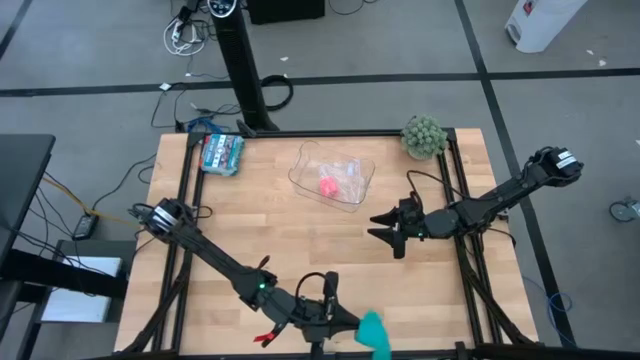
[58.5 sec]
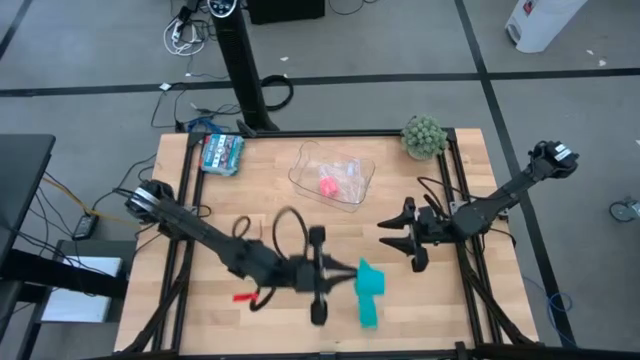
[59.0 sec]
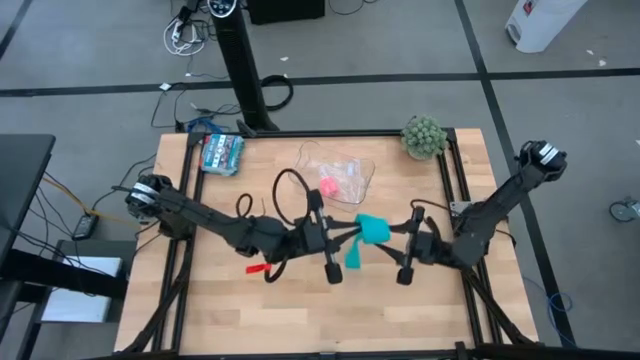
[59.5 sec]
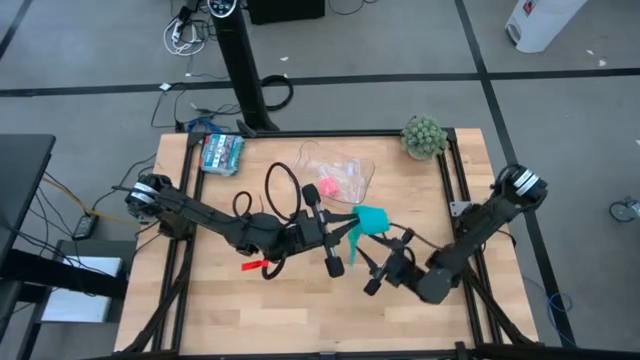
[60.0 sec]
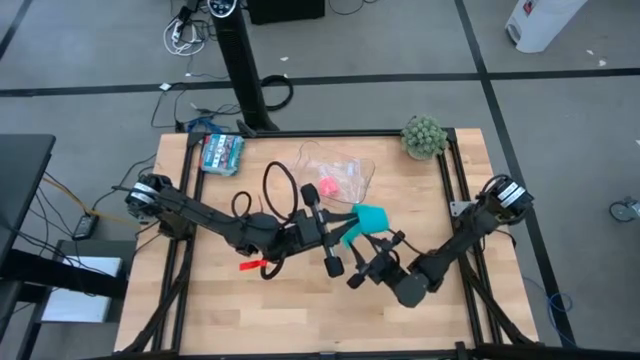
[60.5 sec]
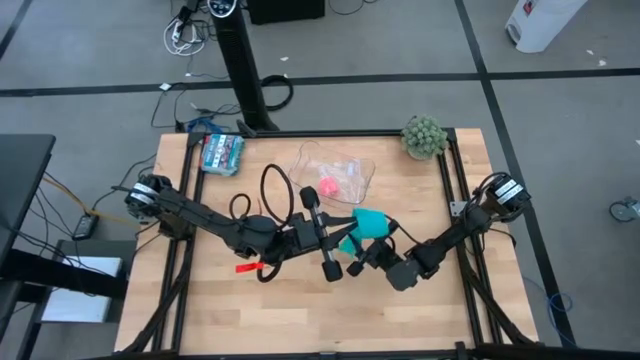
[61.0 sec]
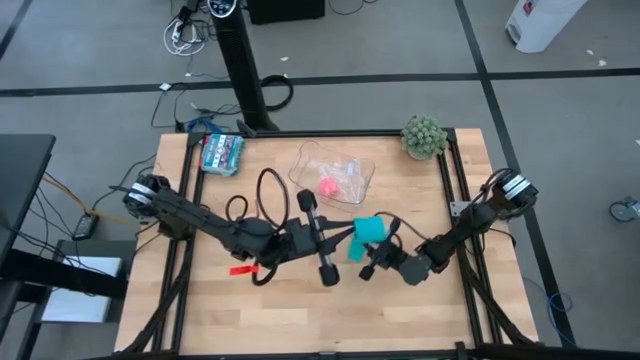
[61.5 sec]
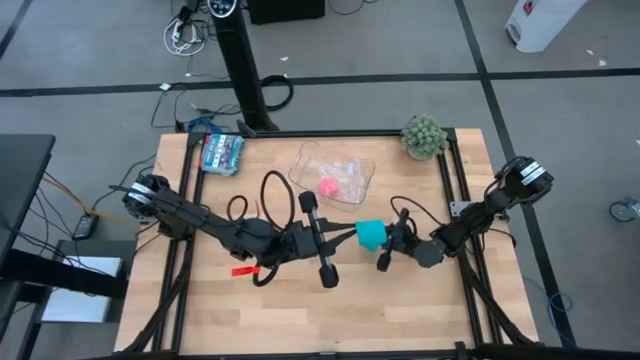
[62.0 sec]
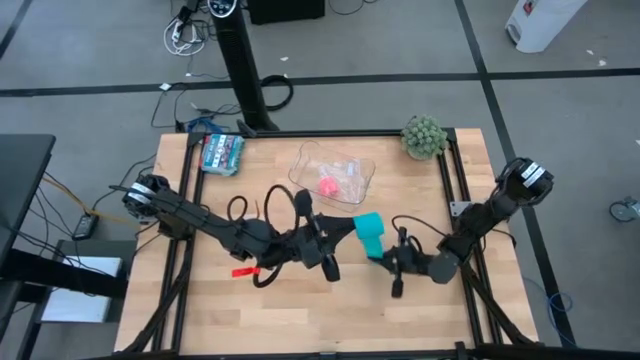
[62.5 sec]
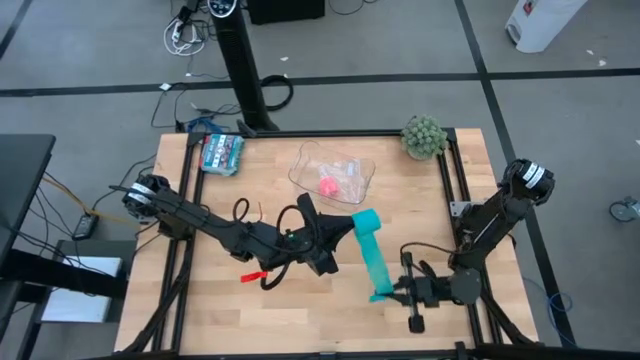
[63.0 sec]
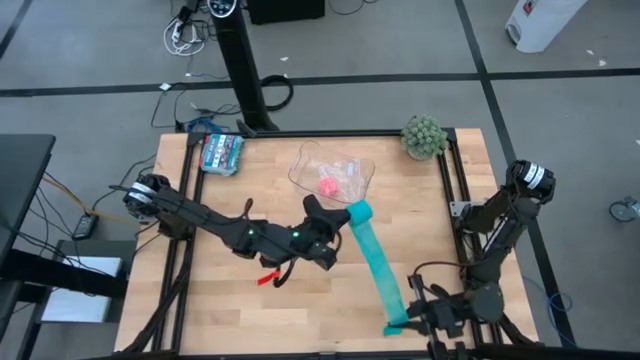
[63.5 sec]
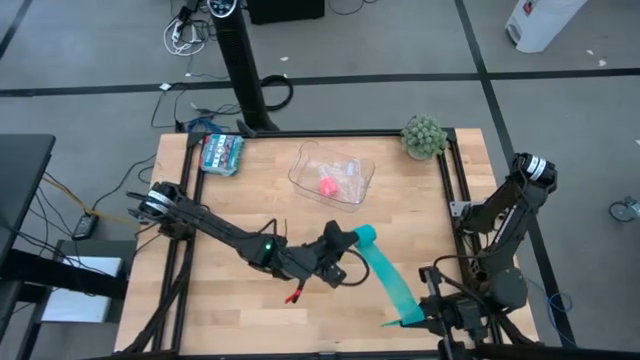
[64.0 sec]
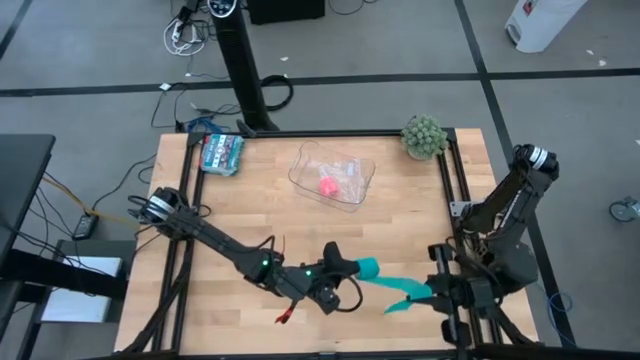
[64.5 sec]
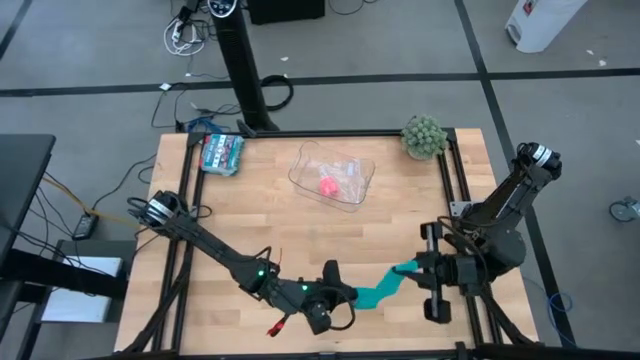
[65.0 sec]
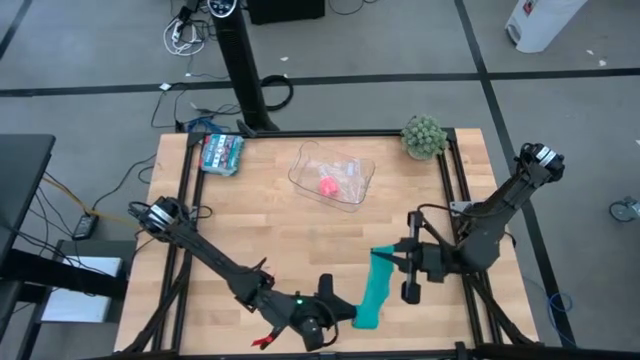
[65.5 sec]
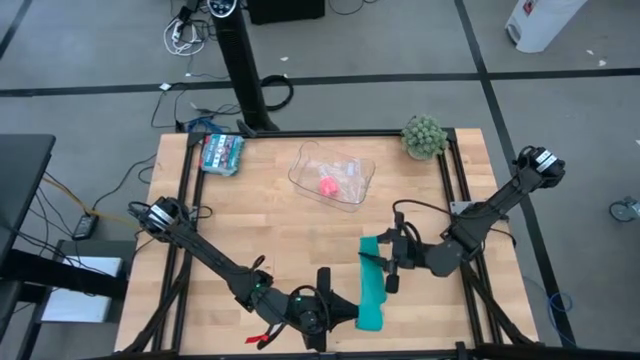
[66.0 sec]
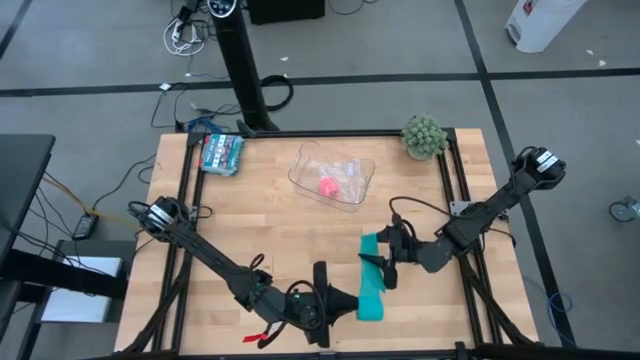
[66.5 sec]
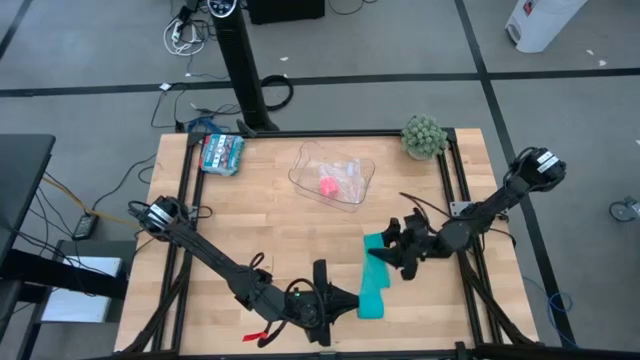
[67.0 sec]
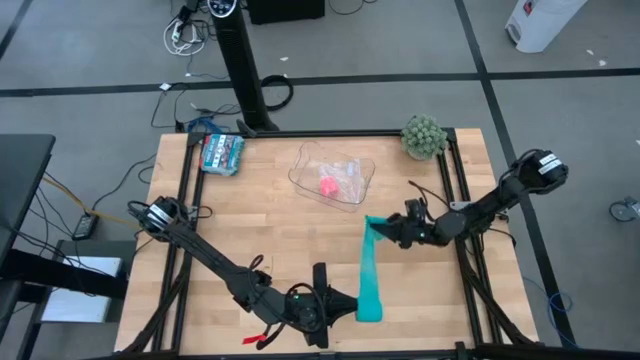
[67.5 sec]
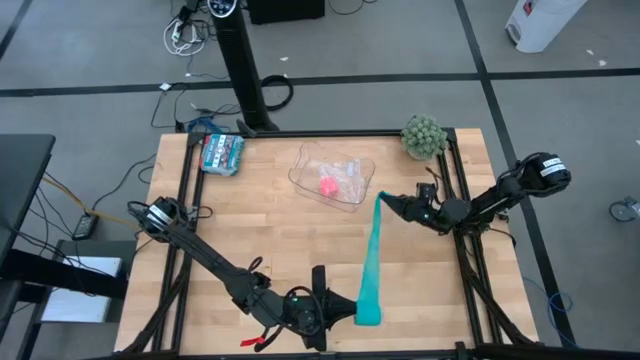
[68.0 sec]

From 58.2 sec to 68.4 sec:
Task: Roll bandage
Roll the blue bandage

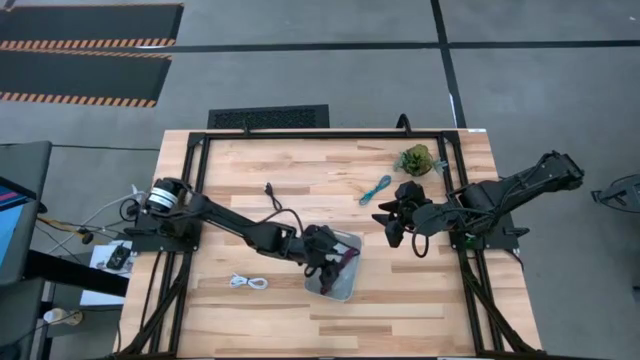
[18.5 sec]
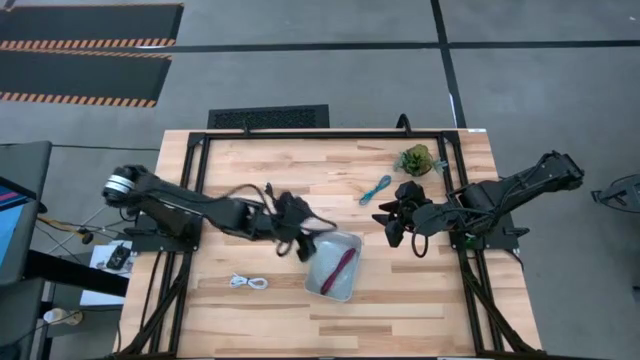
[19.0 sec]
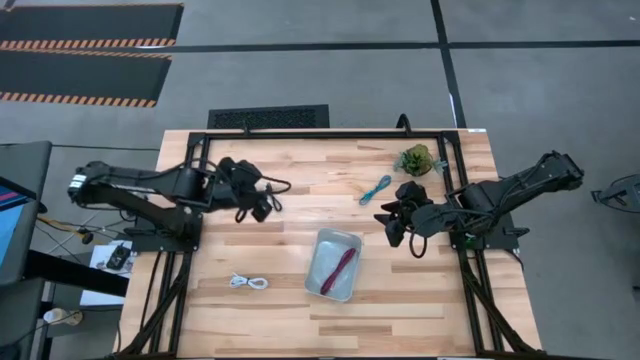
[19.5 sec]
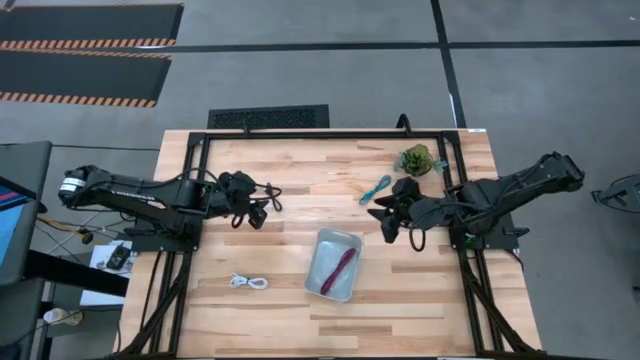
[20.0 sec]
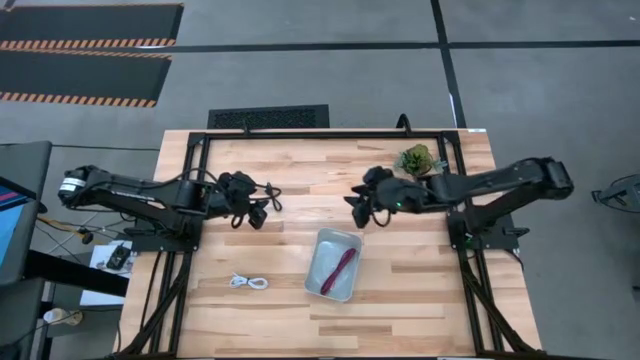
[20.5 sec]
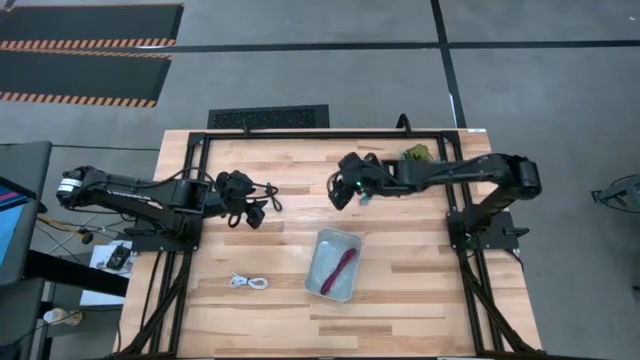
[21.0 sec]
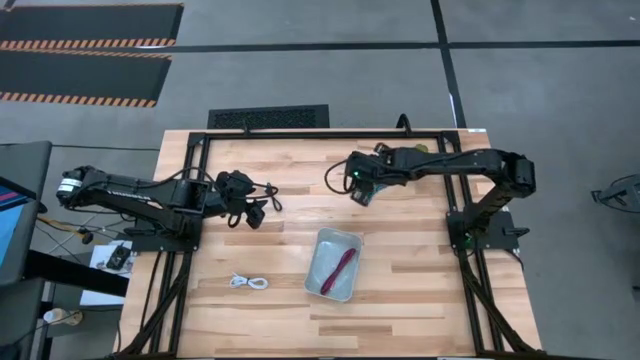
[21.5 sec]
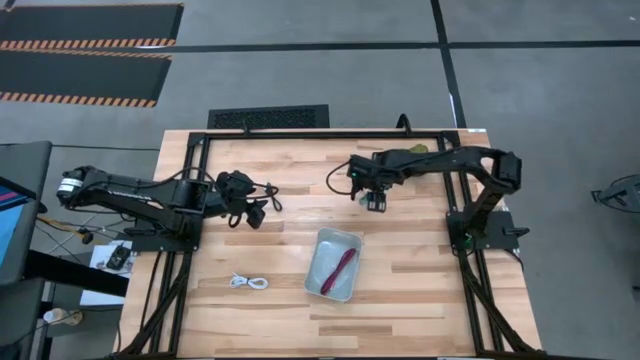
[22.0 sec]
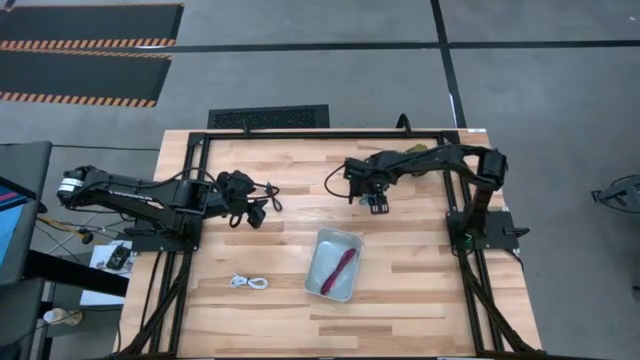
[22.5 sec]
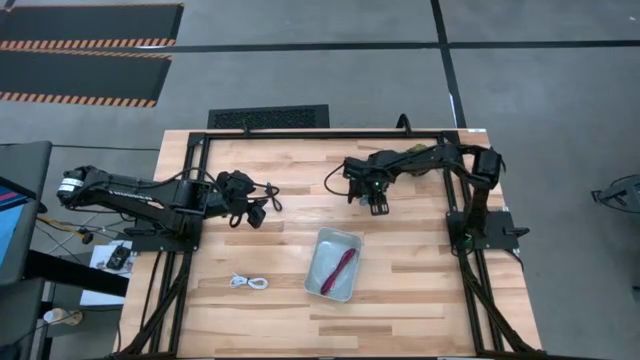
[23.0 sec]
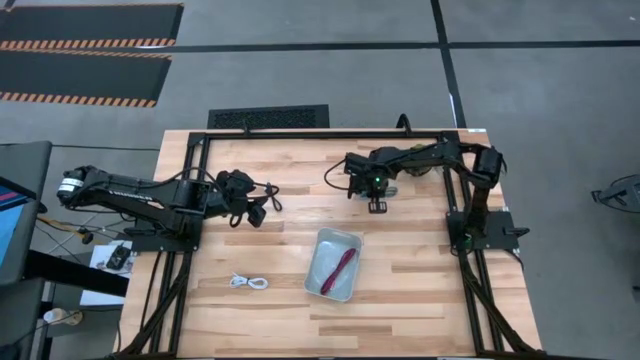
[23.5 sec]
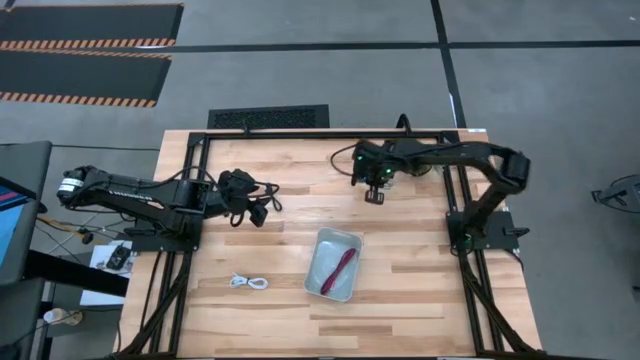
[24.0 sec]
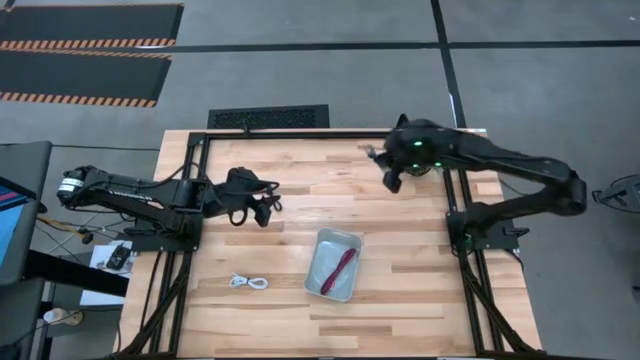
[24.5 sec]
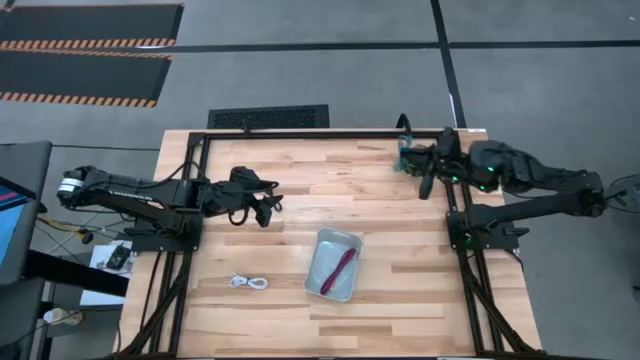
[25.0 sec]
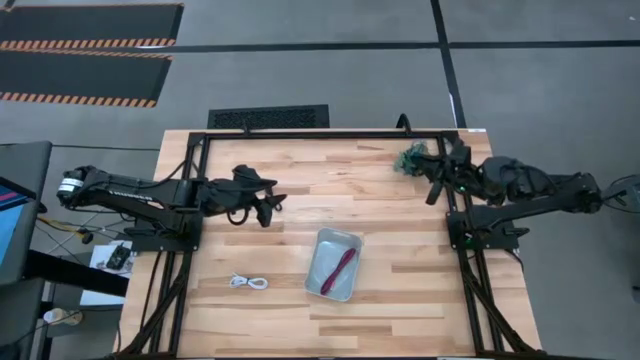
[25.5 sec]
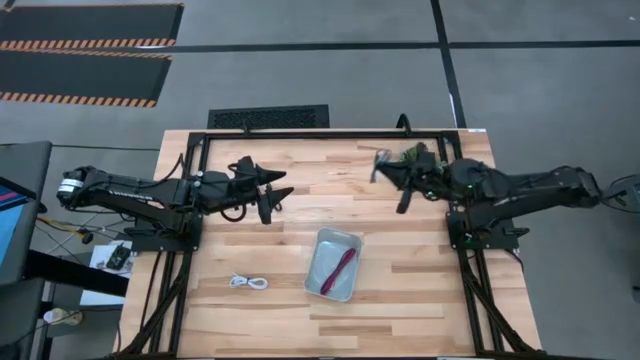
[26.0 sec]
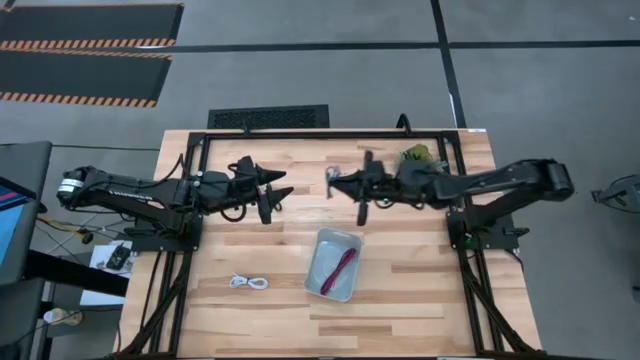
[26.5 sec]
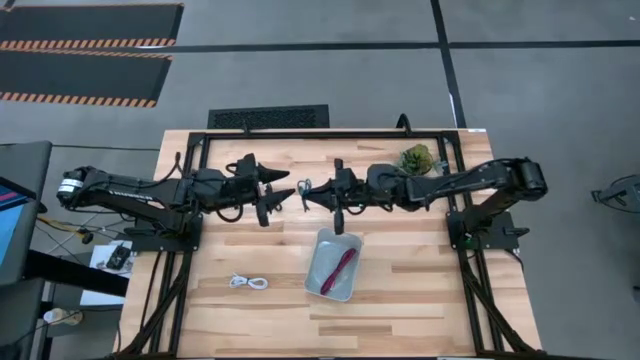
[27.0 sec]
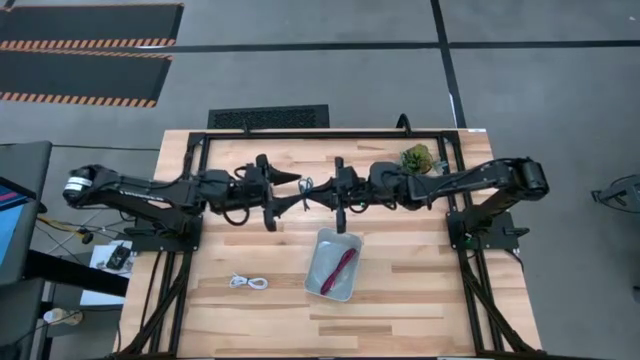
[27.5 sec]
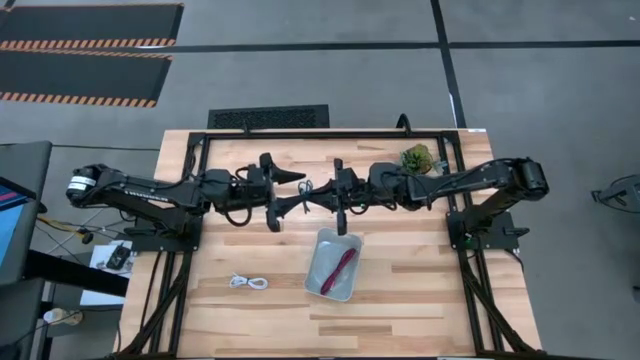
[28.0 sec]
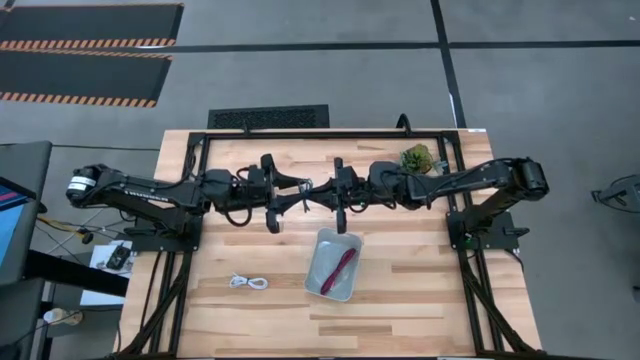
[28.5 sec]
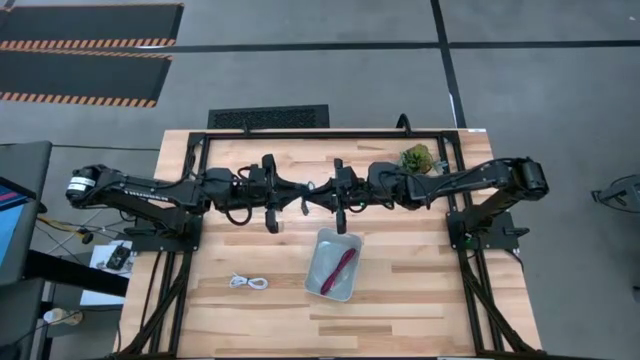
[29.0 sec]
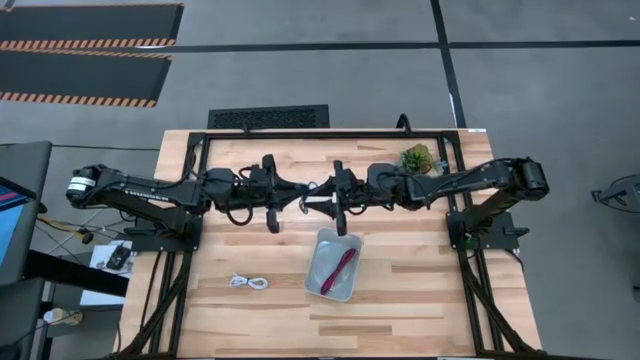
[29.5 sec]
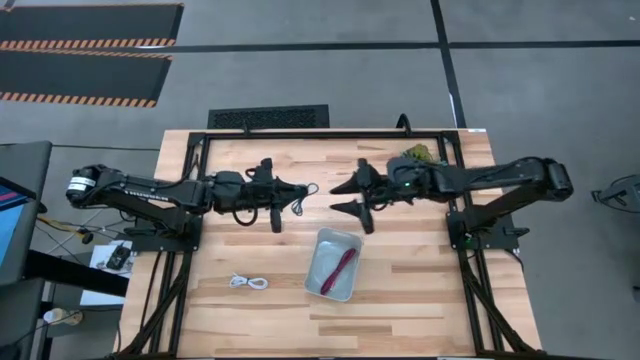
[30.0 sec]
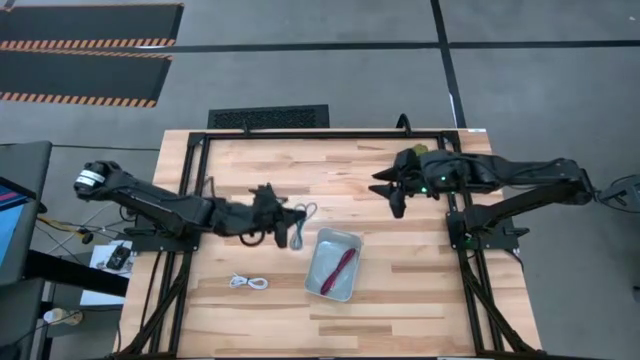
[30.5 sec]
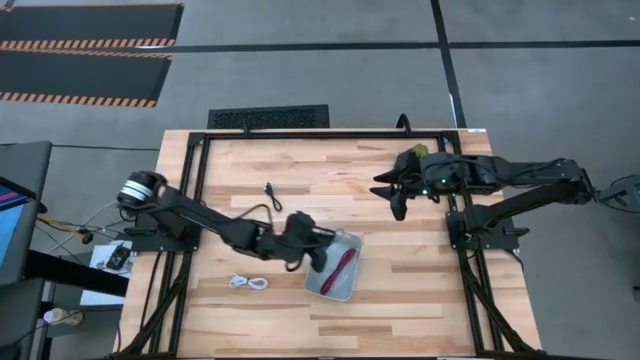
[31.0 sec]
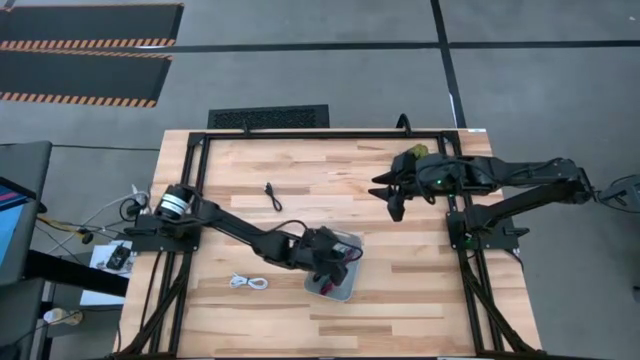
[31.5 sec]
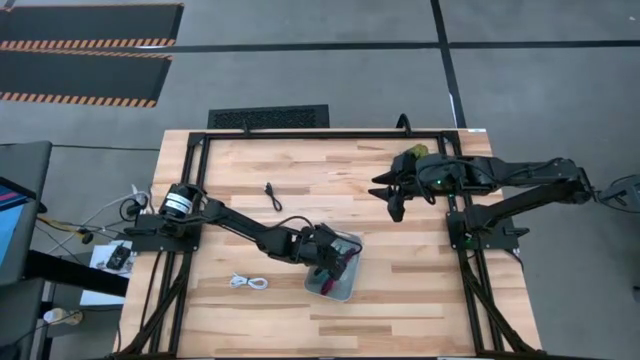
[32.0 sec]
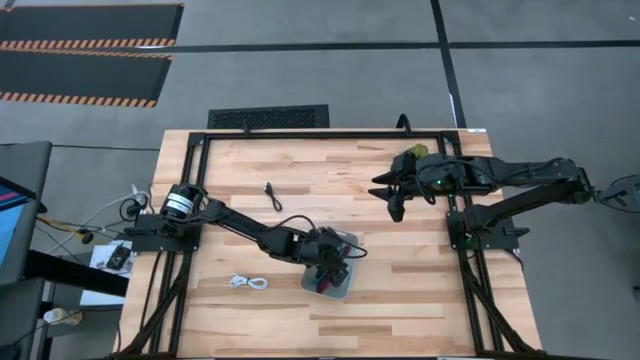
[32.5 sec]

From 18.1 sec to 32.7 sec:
Task: Pick and place USB-C Cables
Put the blue charger cable into the gray bin
